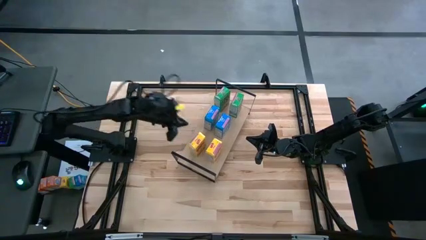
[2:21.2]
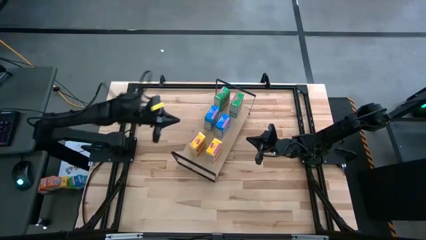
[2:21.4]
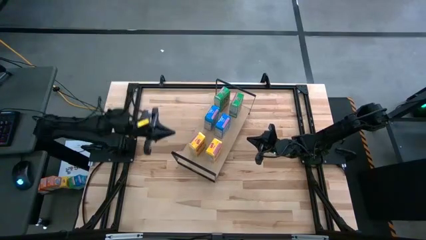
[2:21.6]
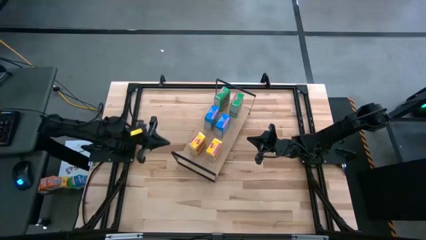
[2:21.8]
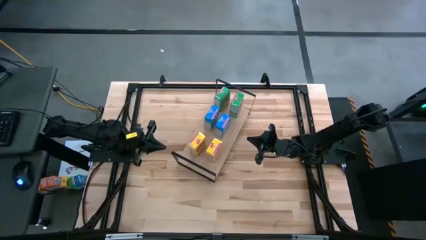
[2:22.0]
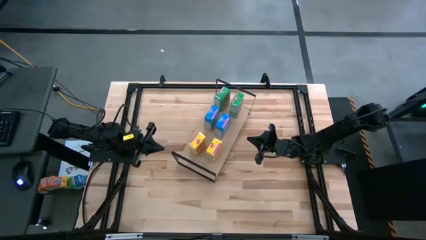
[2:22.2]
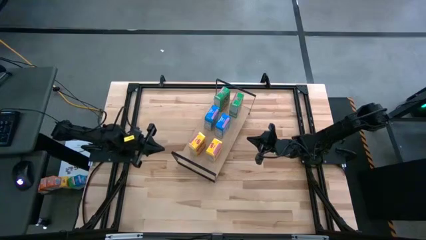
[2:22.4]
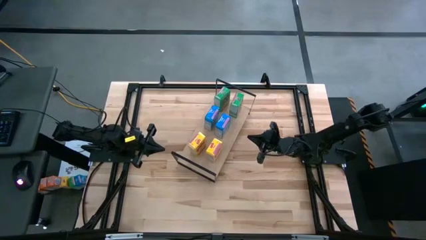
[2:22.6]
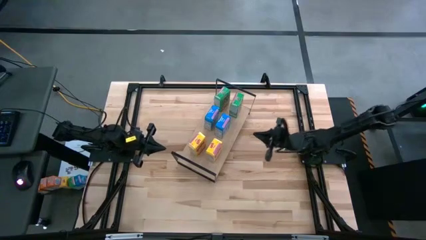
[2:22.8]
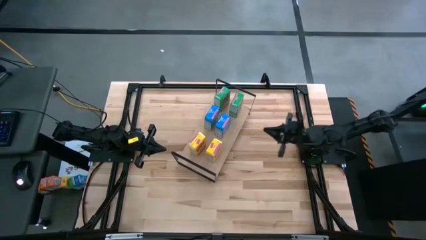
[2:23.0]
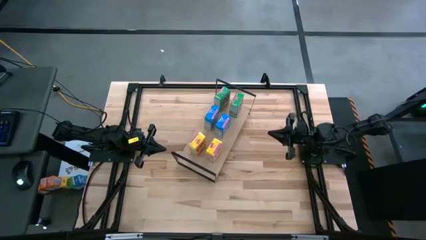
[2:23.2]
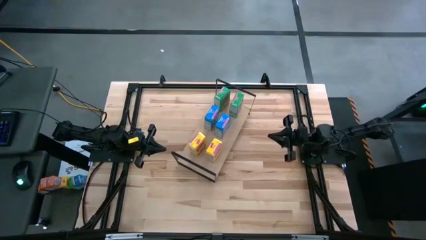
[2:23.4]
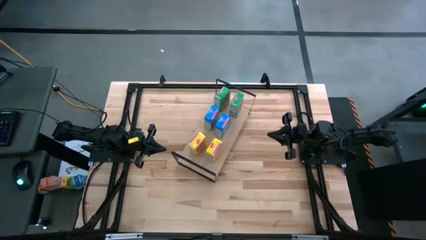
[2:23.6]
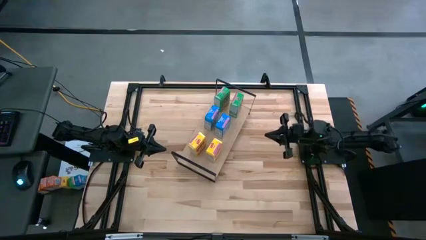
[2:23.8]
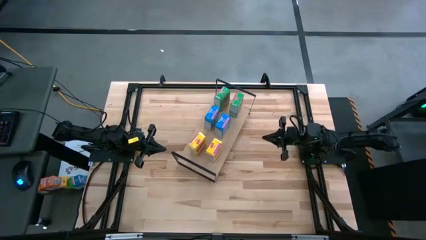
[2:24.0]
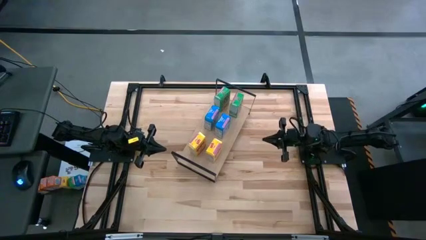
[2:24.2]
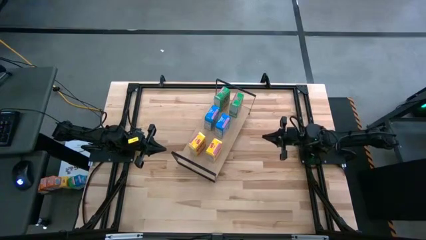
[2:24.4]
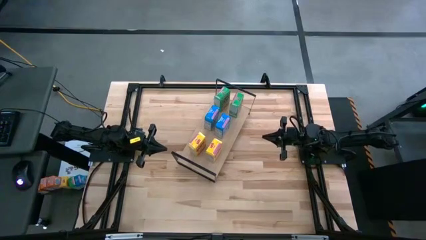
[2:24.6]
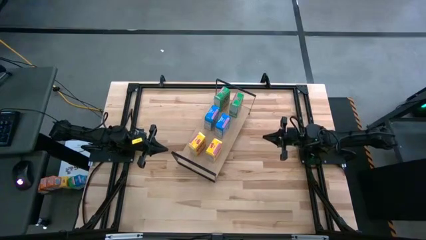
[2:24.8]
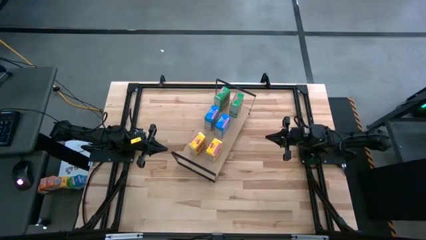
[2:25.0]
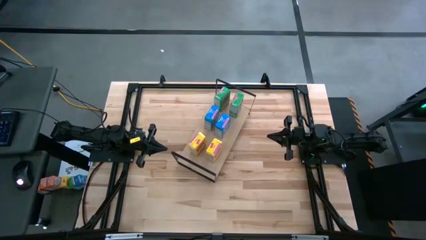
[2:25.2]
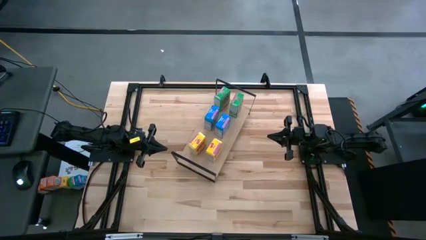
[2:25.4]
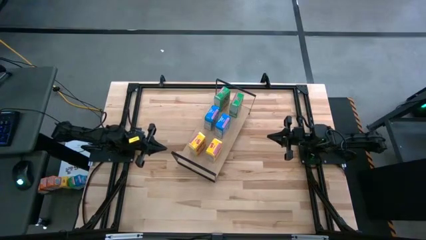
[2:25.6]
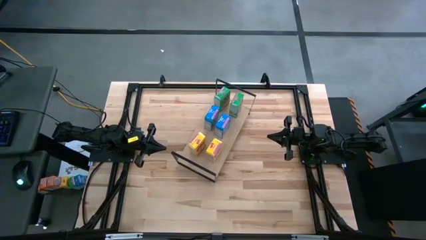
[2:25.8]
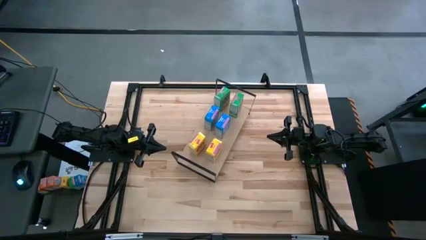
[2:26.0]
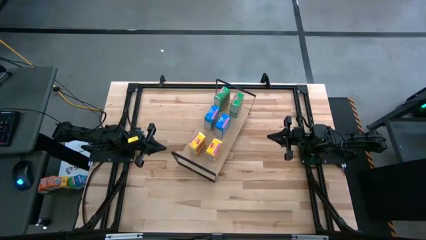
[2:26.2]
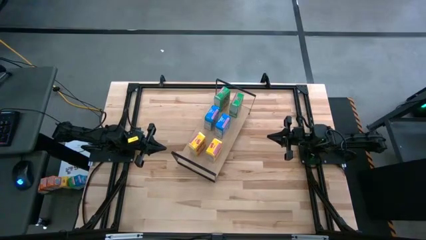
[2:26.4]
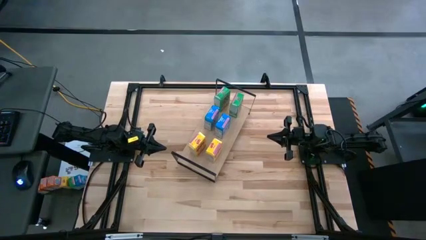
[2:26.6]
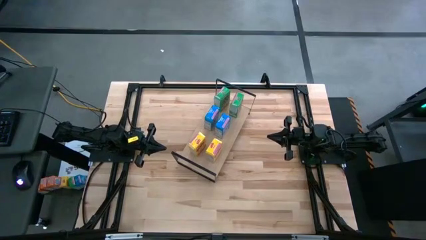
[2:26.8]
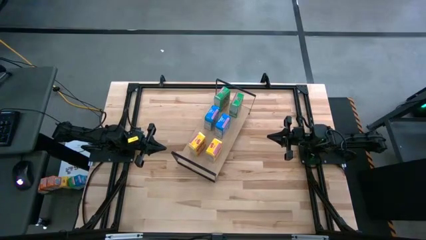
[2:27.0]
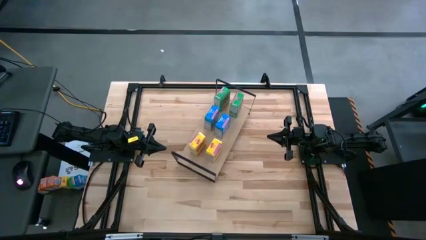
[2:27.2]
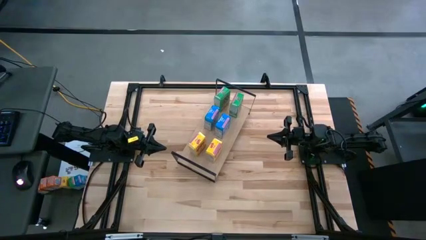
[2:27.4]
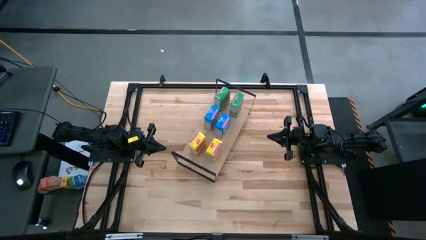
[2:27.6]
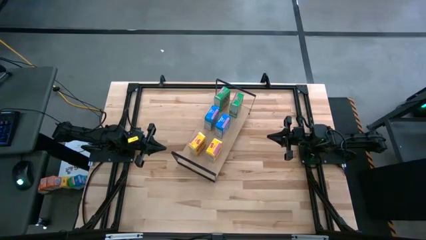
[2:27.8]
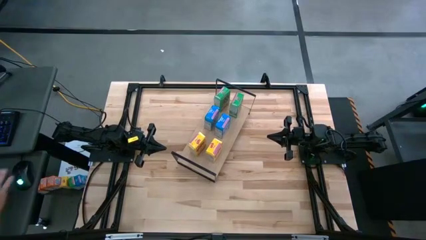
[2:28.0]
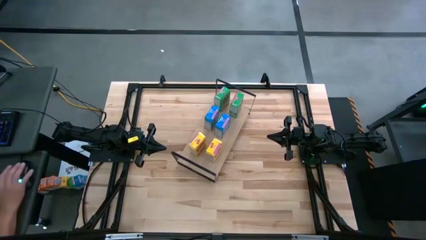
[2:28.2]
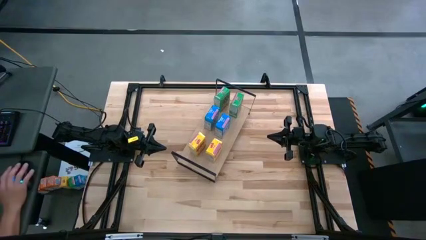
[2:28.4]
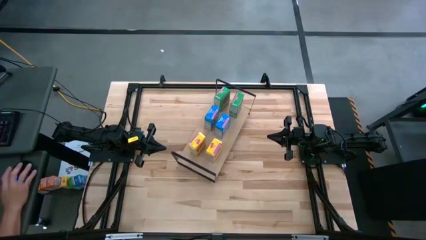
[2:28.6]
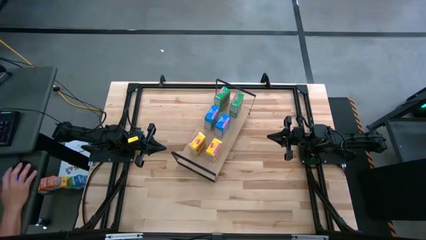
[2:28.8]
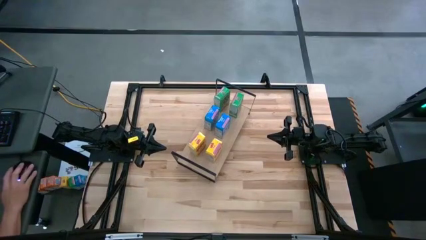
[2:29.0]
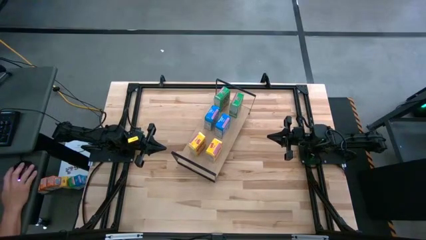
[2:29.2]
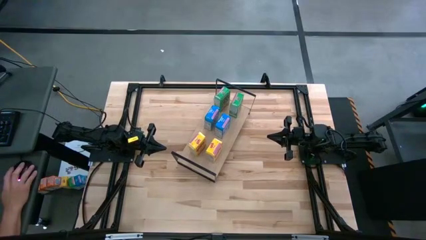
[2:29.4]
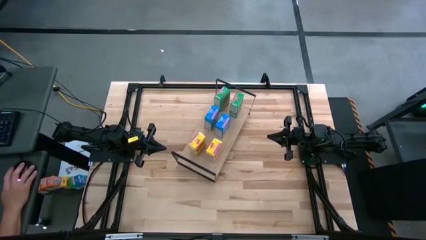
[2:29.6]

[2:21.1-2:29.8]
Task: Stack cereal on shelf
Return to Home Position

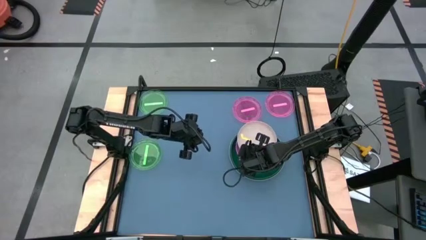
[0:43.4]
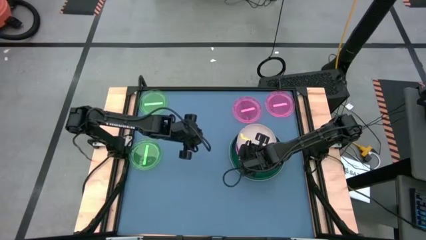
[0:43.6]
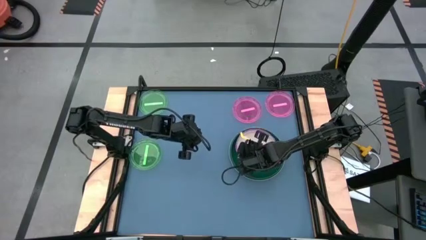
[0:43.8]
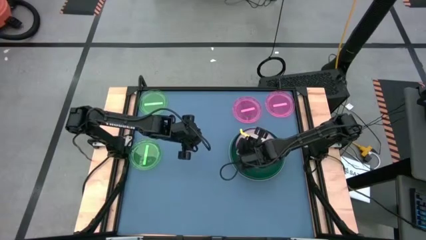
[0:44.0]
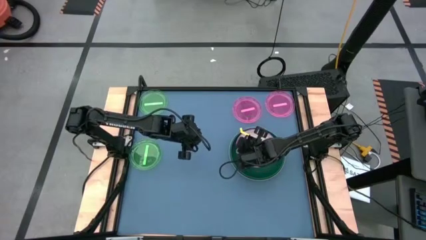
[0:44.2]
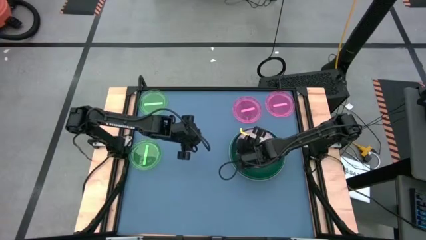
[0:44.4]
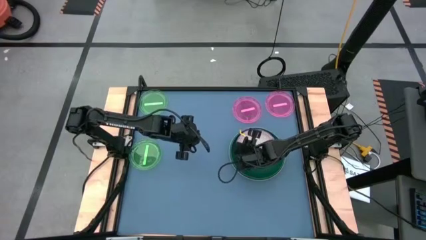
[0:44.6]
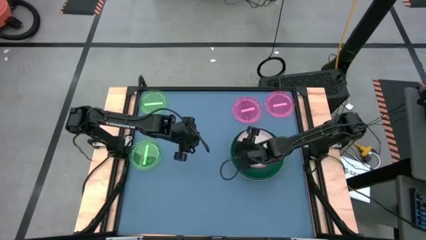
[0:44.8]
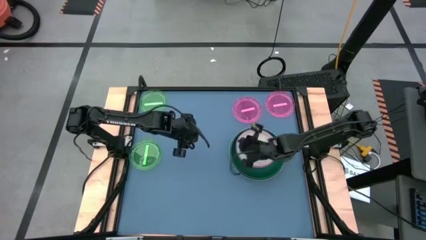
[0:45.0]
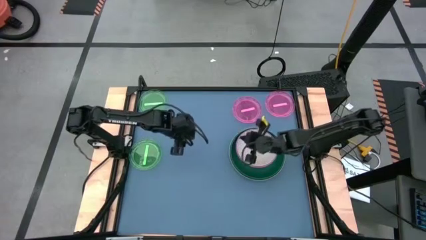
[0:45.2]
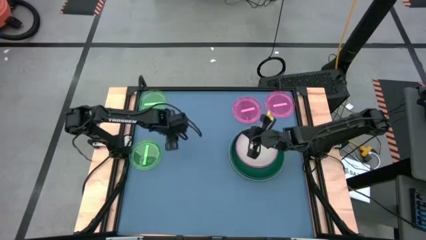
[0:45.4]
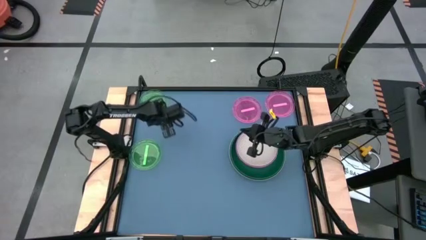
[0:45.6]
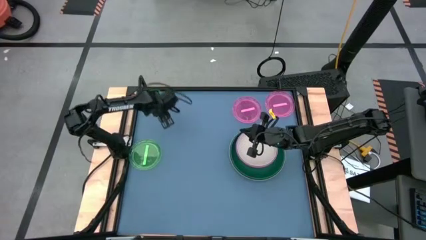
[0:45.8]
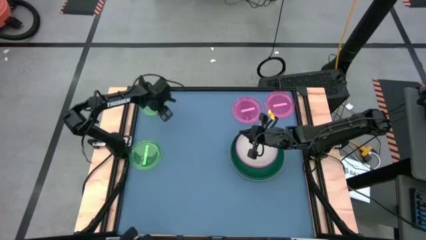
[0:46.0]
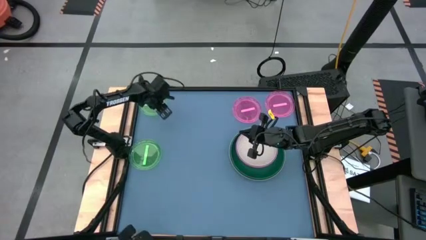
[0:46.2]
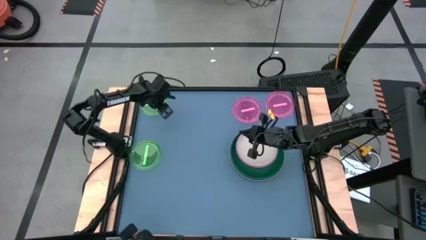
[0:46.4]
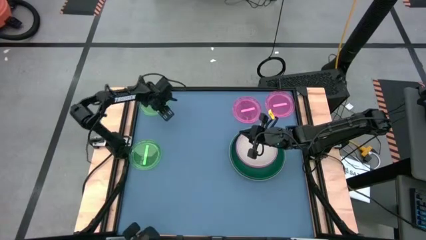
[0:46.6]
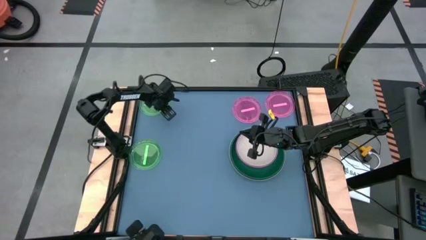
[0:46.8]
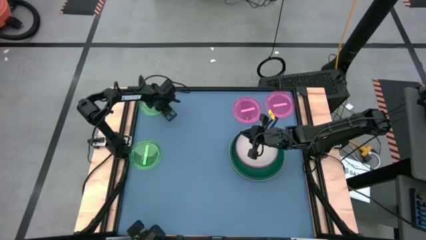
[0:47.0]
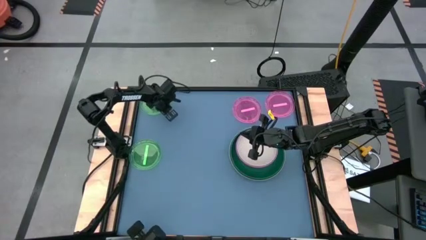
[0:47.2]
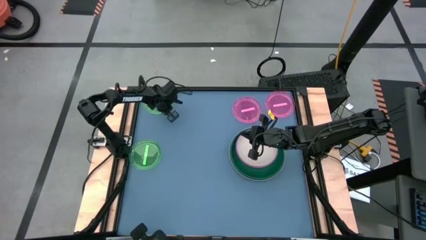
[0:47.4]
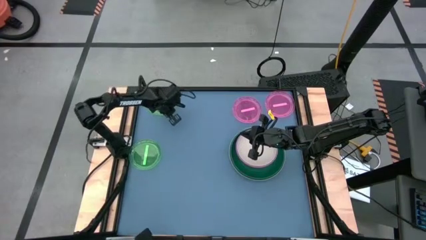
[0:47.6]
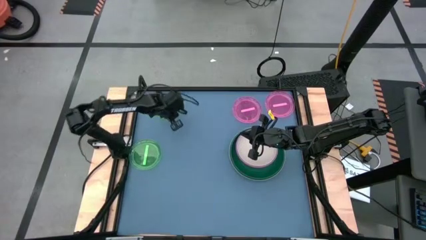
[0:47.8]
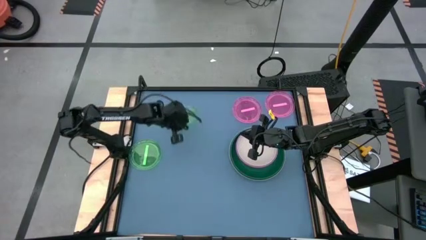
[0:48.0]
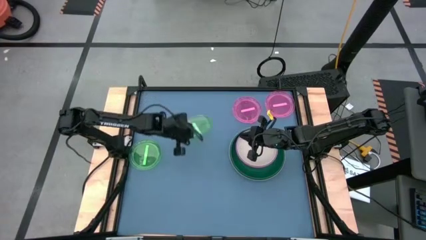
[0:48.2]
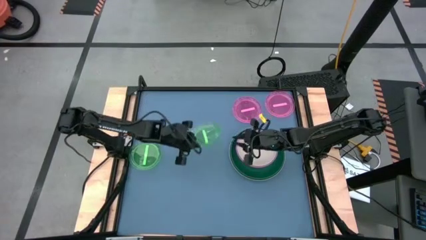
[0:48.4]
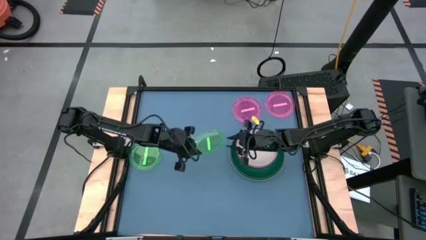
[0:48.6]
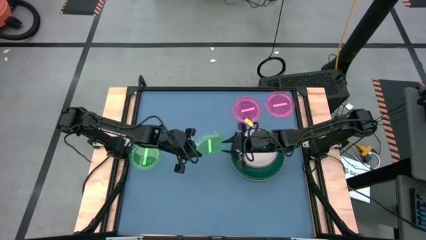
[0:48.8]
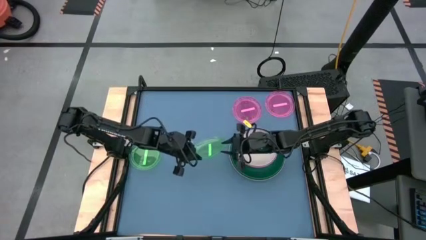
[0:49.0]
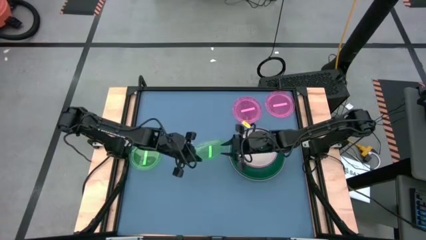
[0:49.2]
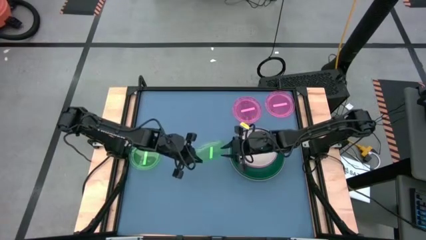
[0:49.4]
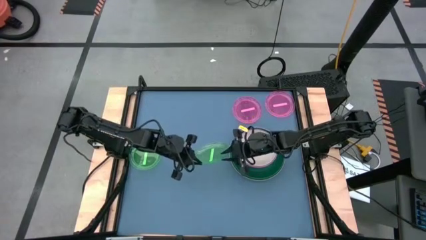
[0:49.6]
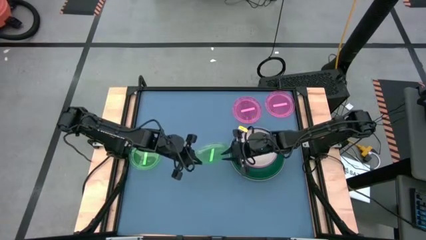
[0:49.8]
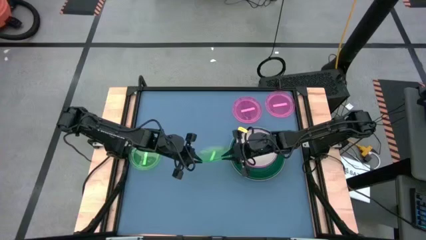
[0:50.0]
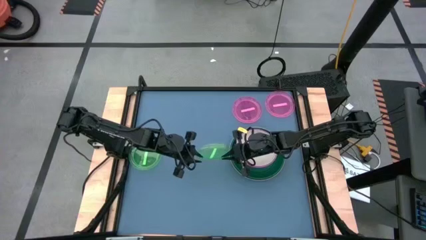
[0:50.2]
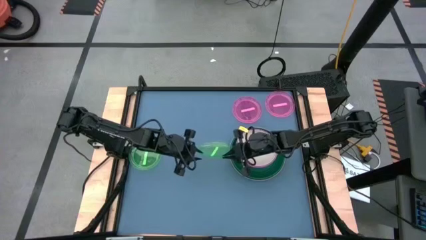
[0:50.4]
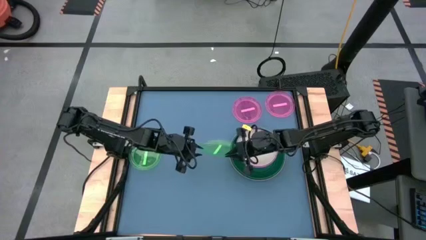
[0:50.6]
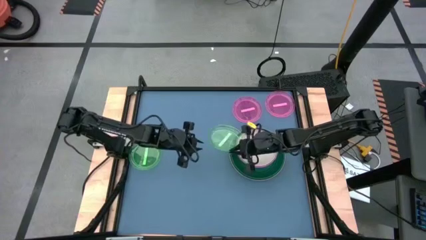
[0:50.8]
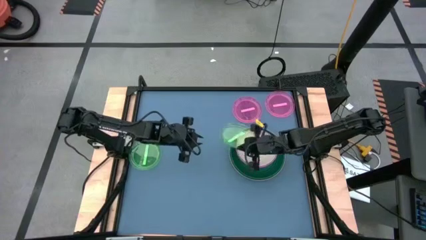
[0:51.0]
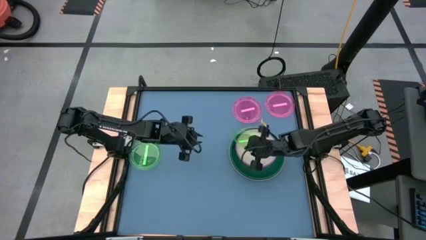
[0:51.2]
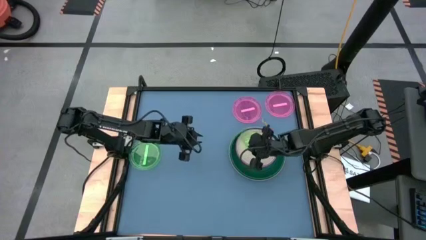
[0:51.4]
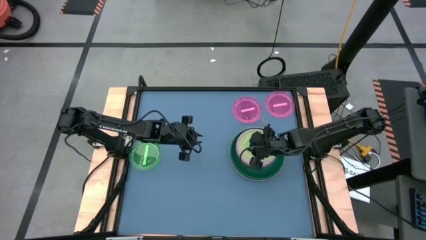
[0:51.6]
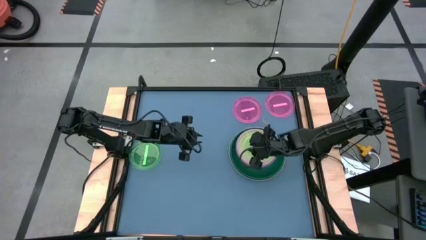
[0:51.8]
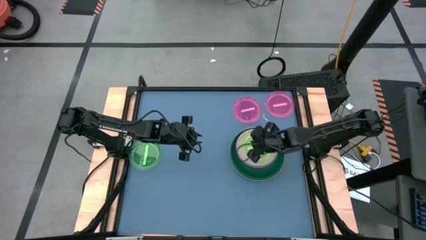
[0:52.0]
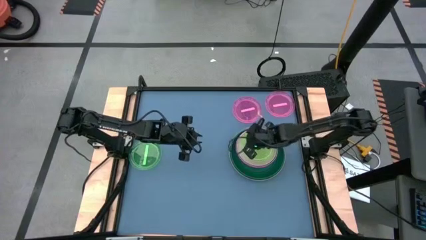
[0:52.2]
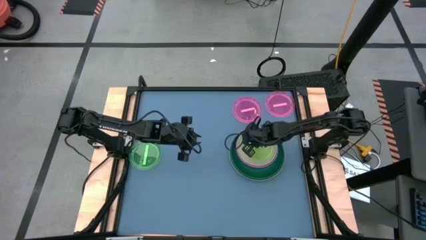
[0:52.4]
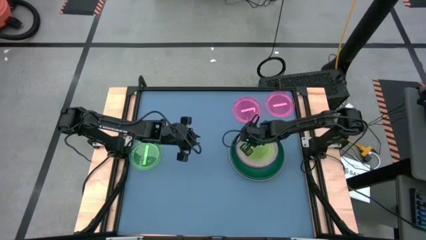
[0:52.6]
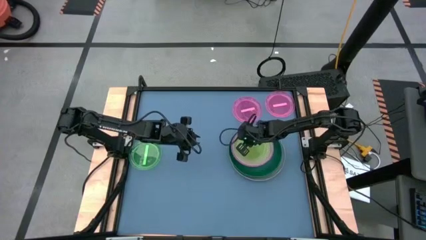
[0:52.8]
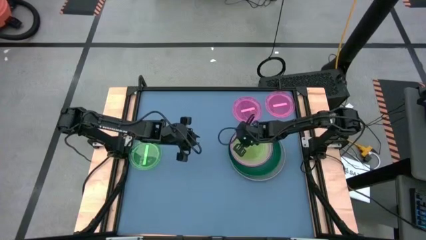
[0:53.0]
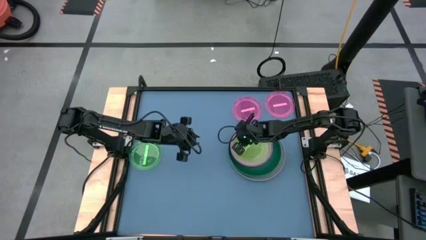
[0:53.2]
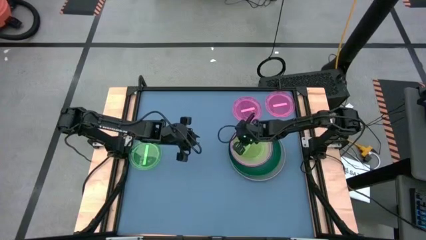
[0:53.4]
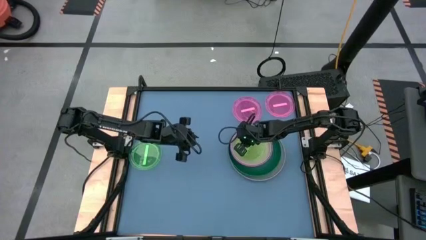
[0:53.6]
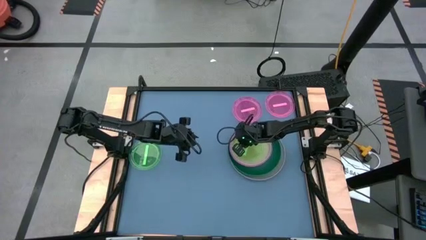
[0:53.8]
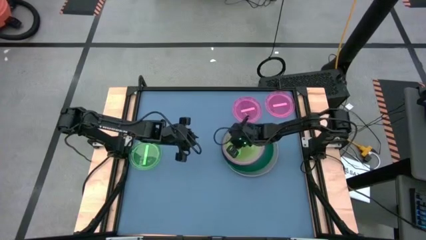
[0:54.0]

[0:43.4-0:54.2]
Task: Stack plastic plates
Stack the top light green plate on top of the white plate
